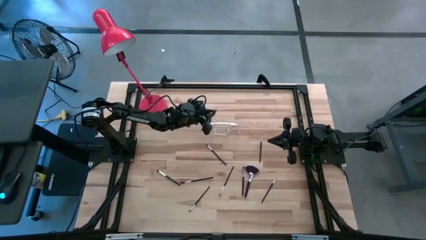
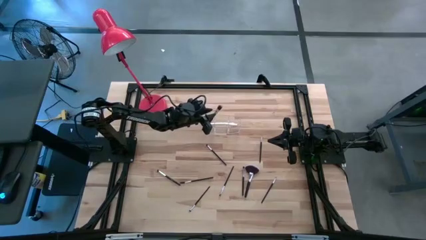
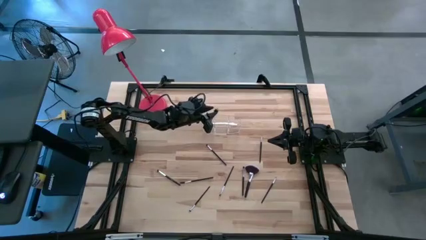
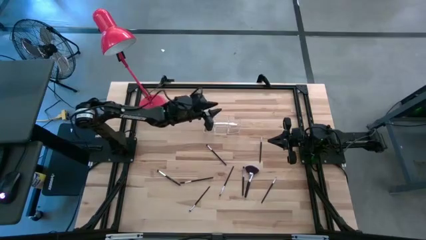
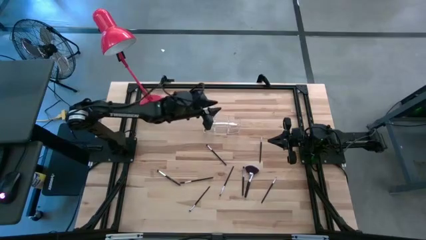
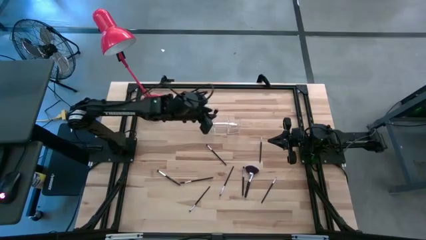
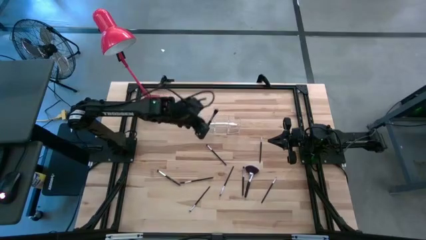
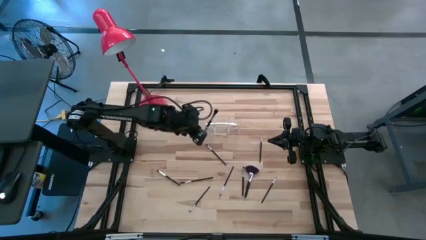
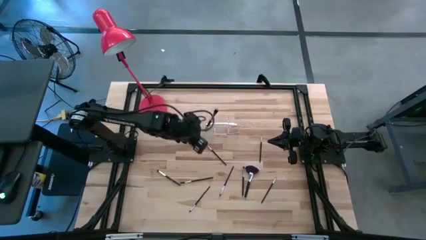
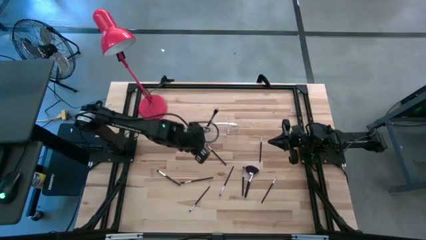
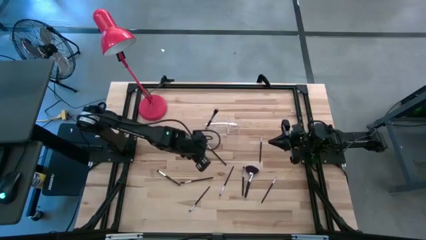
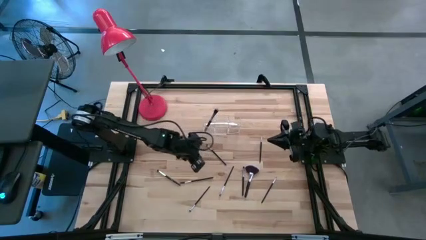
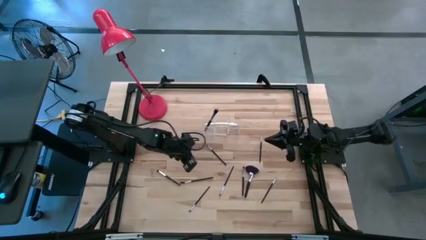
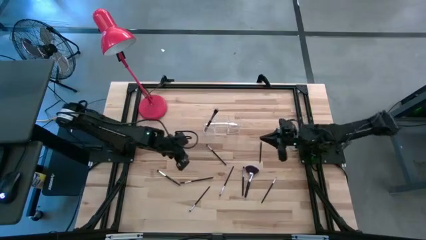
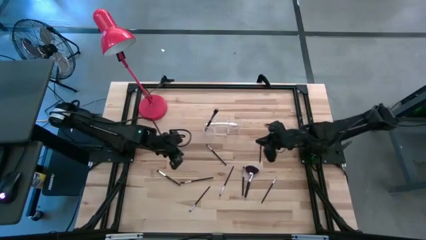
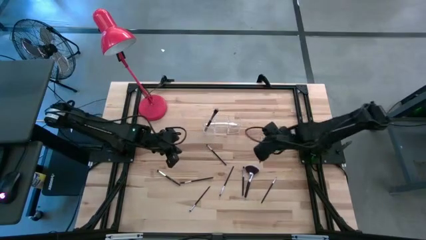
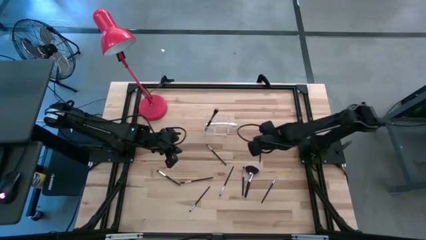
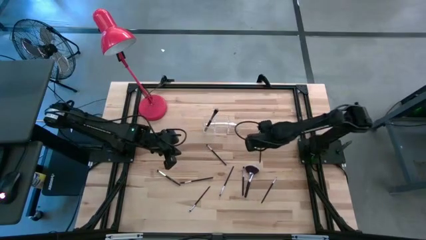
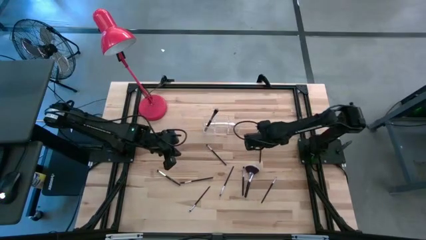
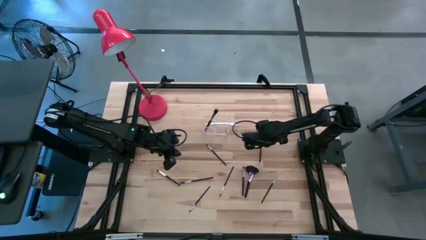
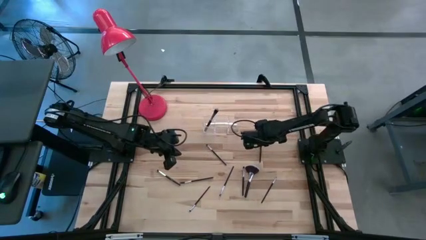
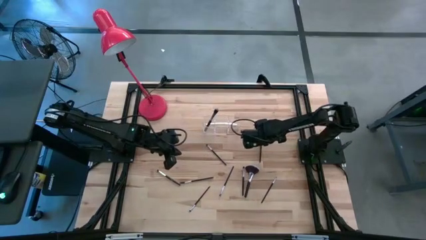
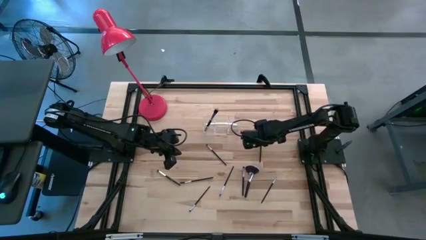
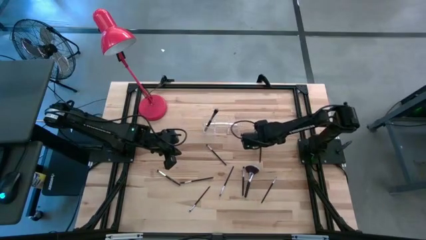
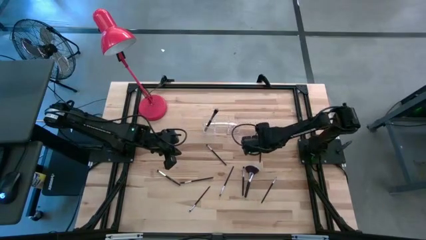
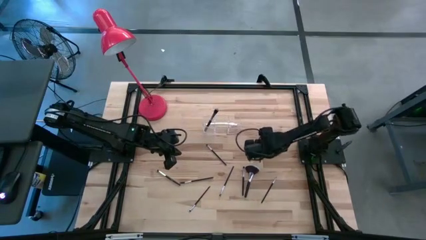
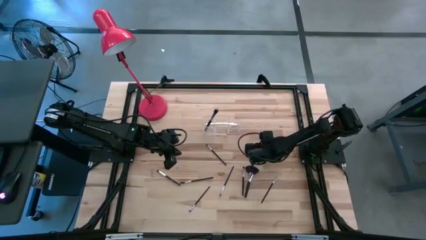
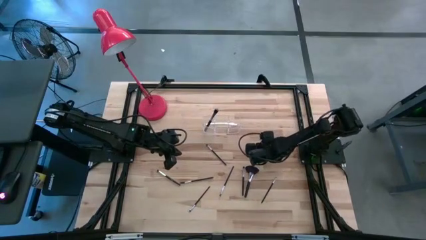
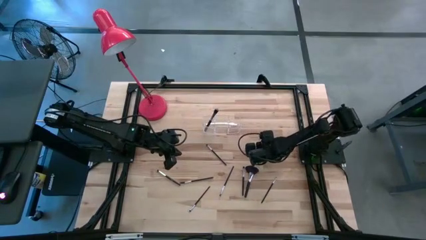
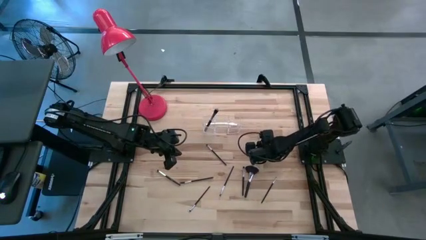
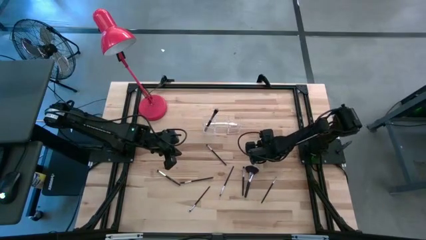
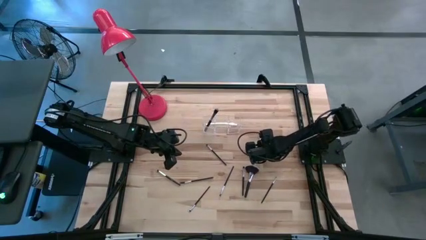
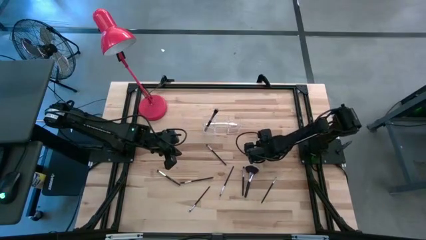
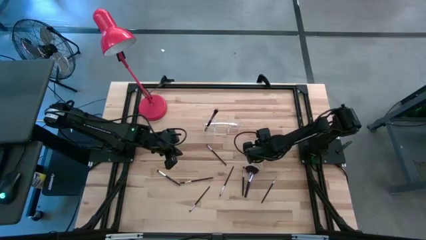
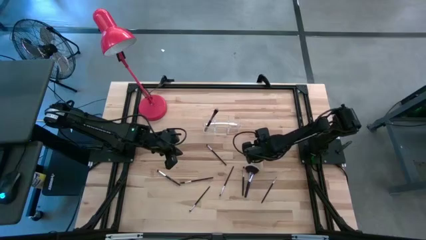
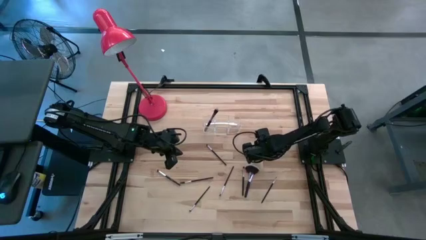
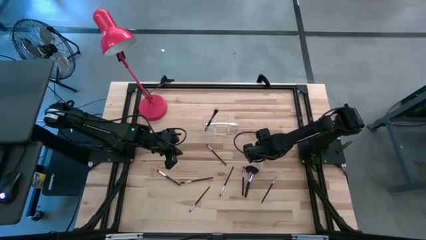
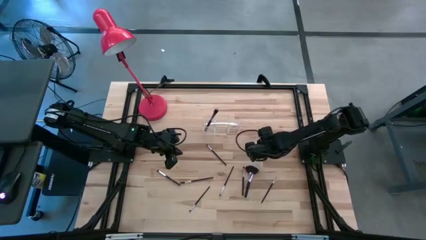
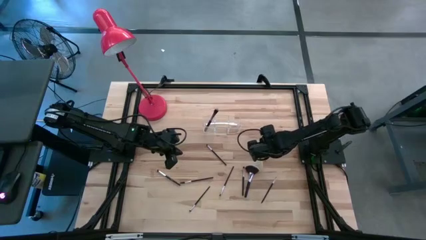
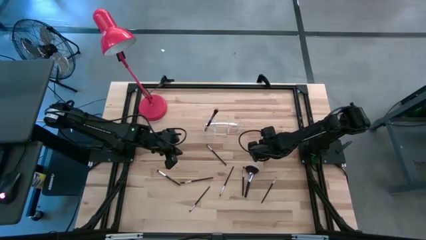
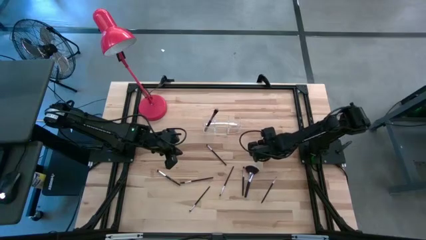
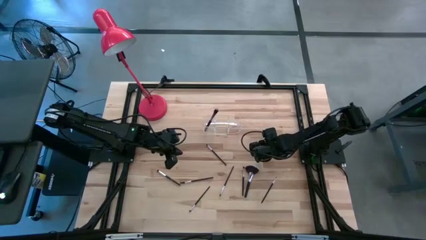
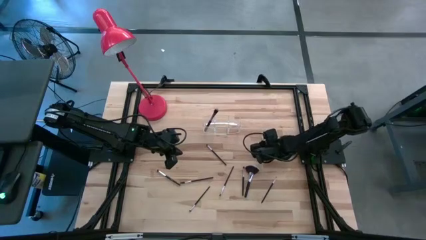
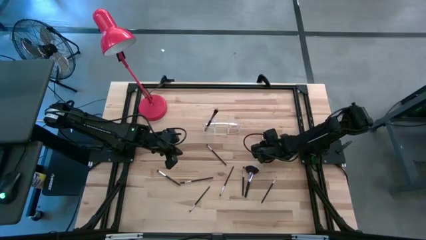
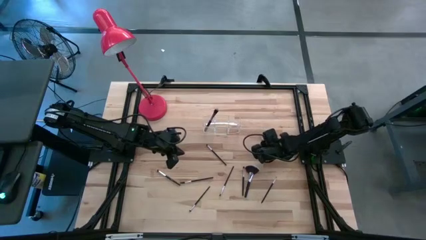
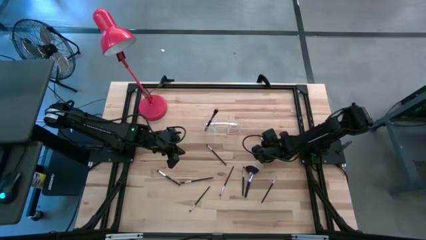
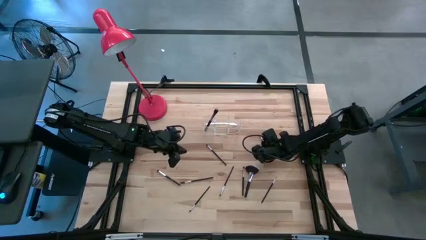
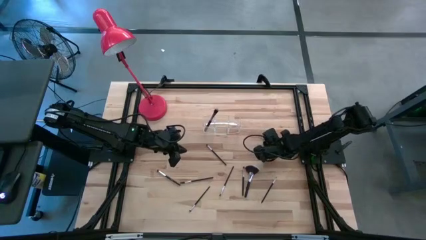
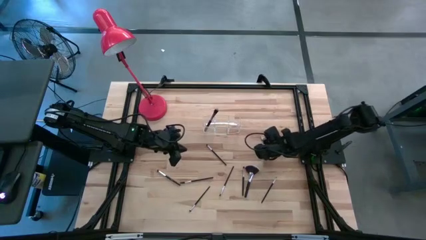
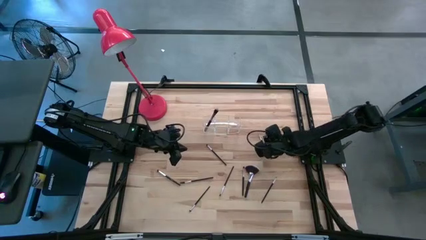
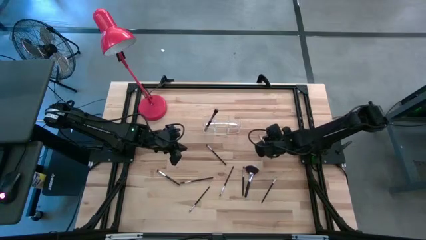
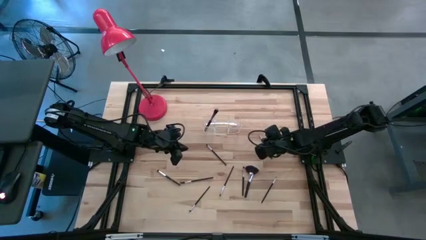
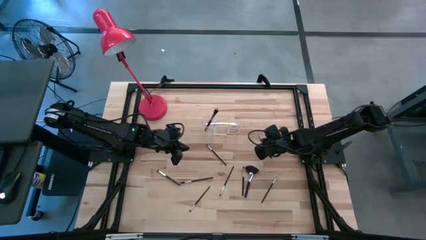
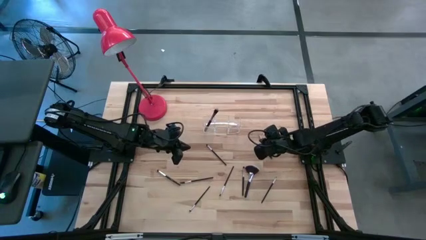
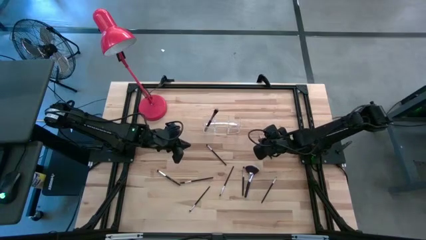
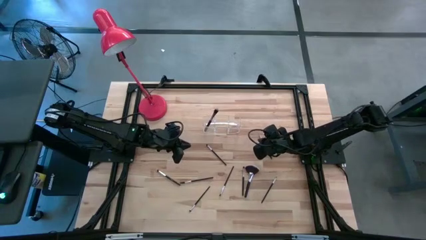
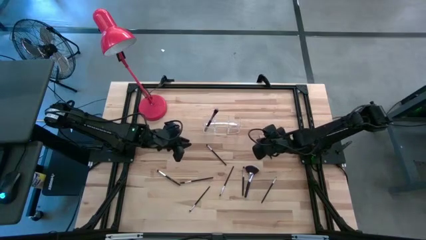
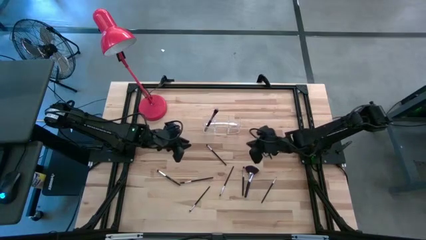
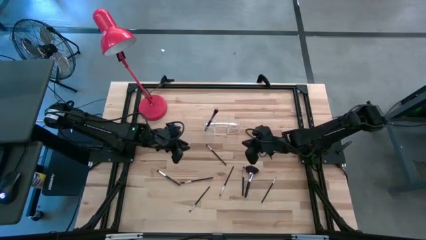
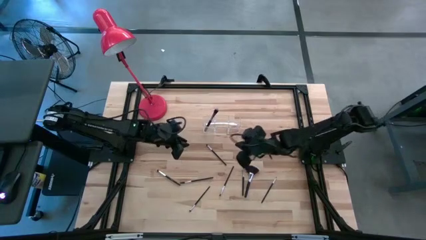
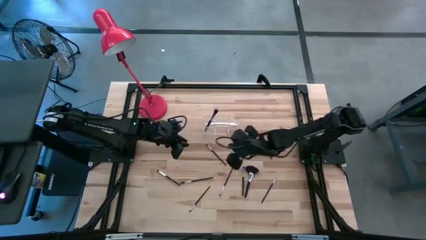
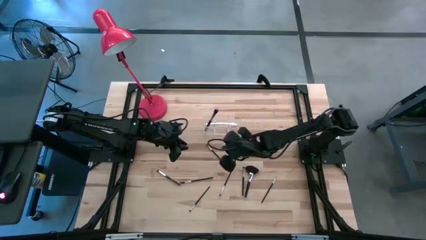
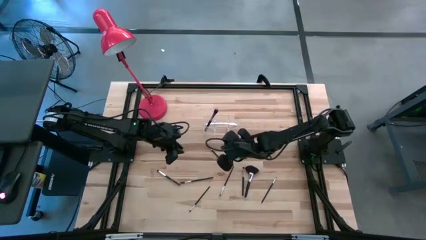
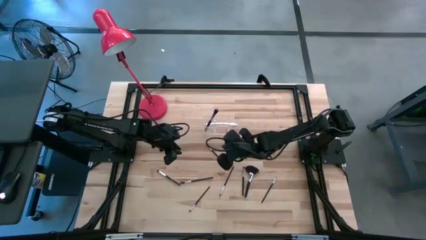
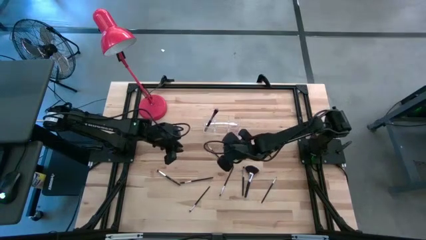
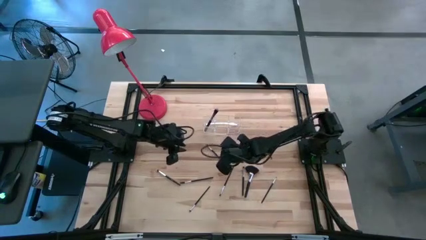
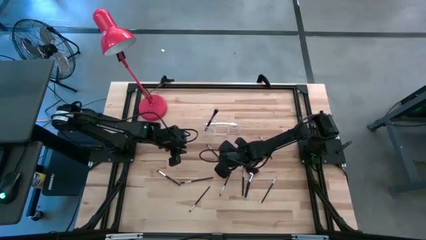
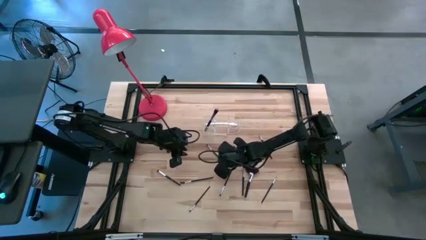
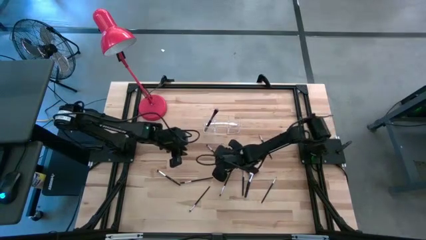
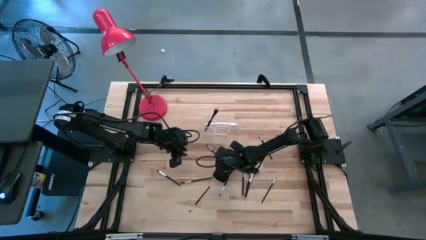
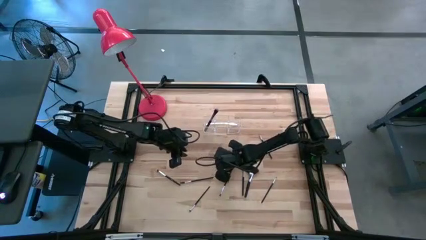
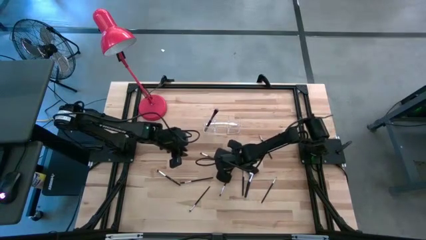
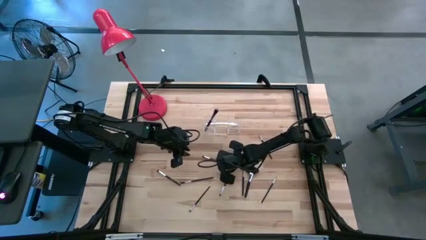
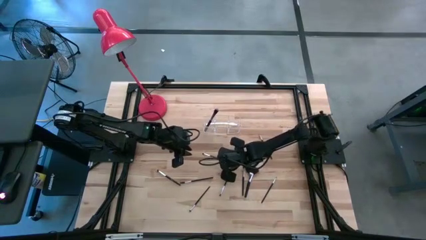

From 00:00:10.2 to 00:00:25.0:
Task: Pick & Place Makeup Supplies
Put the makeup brush into the transparent organizer
